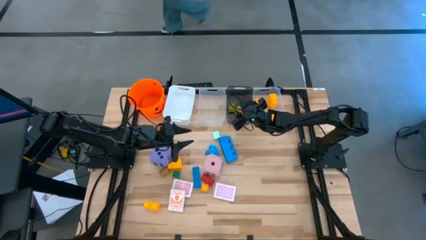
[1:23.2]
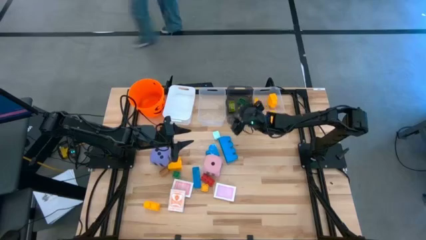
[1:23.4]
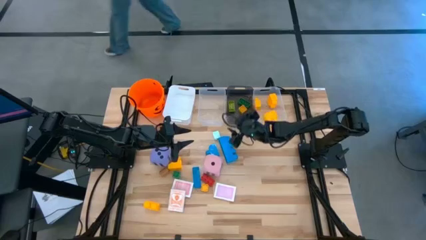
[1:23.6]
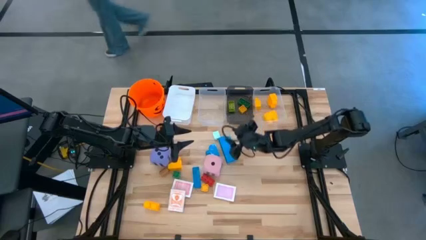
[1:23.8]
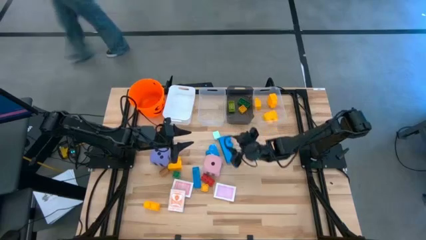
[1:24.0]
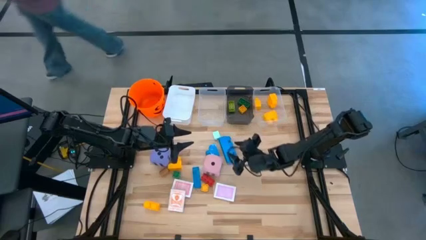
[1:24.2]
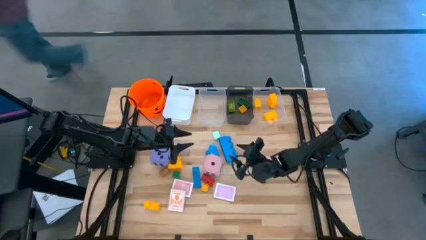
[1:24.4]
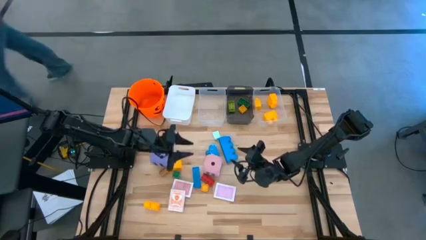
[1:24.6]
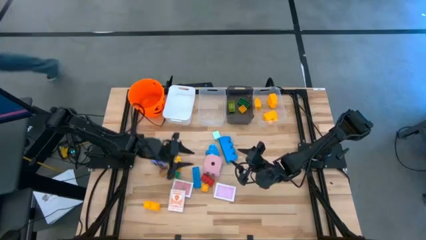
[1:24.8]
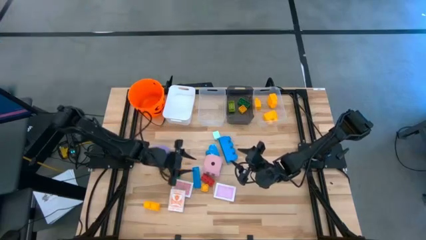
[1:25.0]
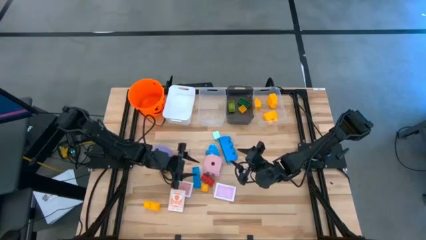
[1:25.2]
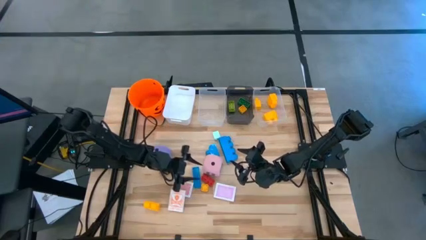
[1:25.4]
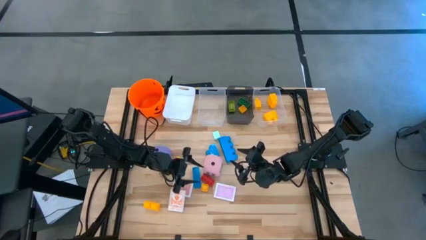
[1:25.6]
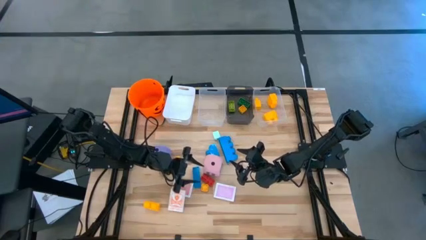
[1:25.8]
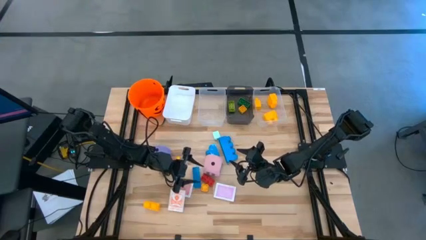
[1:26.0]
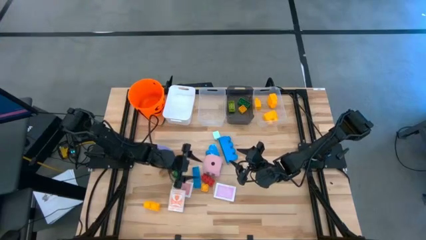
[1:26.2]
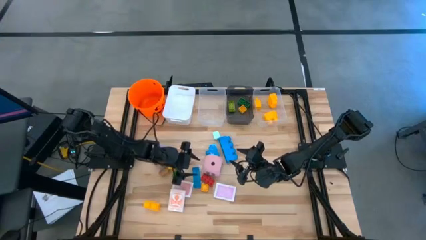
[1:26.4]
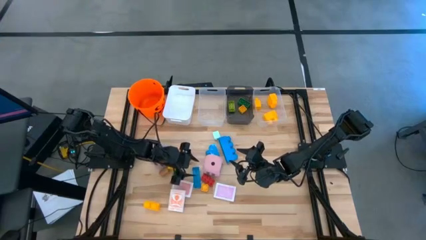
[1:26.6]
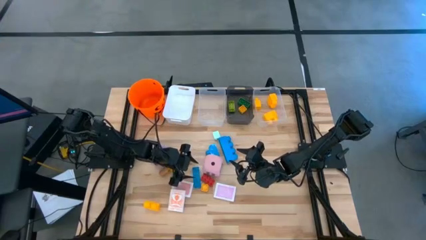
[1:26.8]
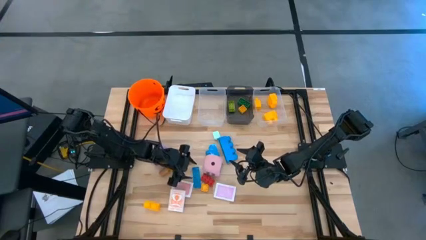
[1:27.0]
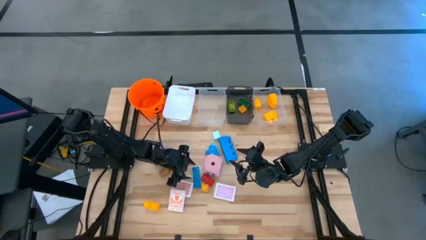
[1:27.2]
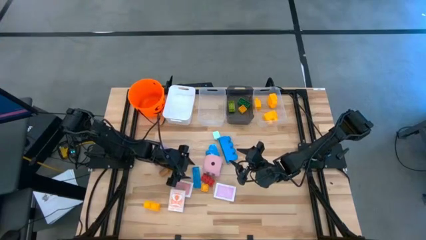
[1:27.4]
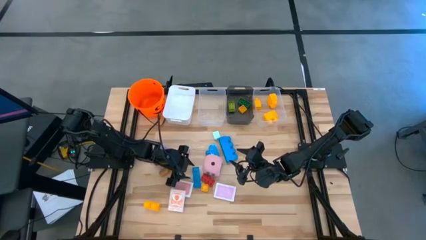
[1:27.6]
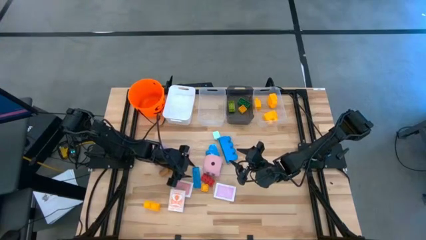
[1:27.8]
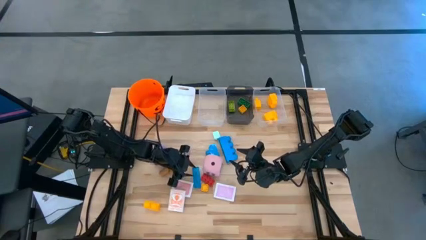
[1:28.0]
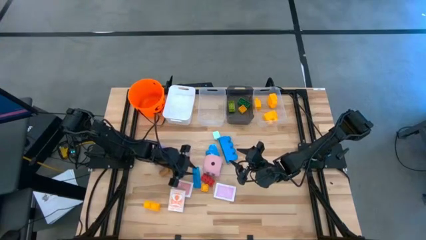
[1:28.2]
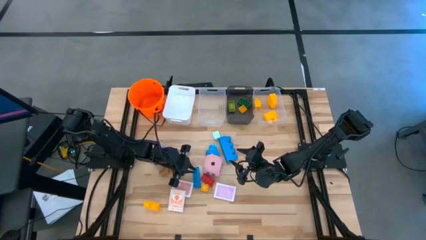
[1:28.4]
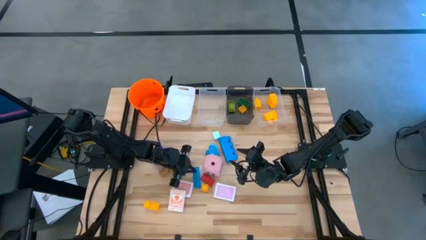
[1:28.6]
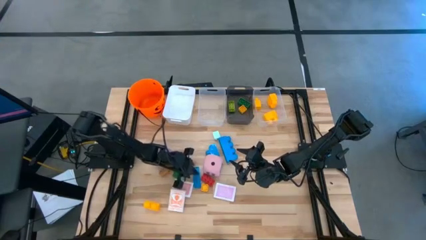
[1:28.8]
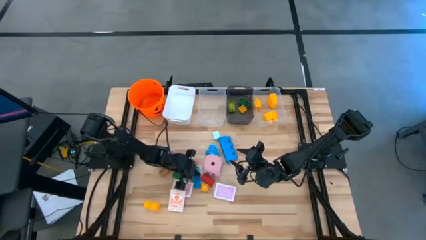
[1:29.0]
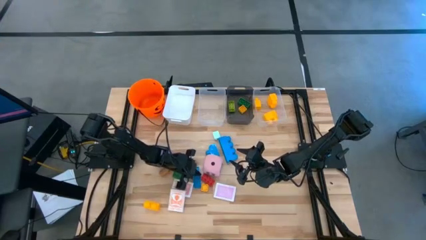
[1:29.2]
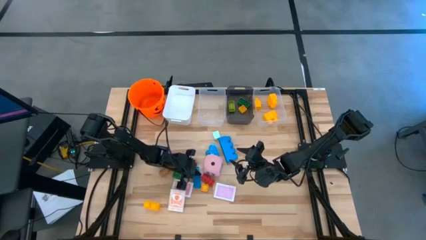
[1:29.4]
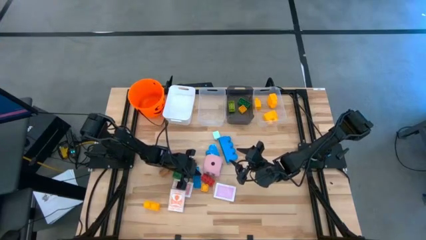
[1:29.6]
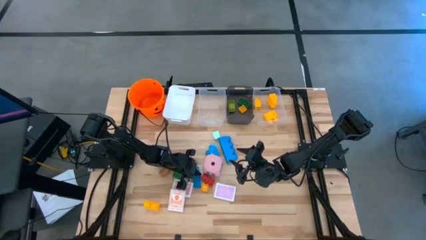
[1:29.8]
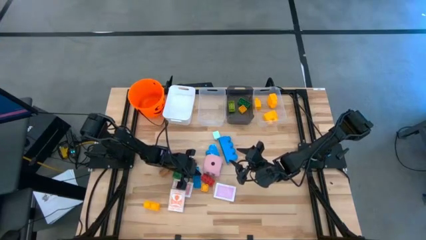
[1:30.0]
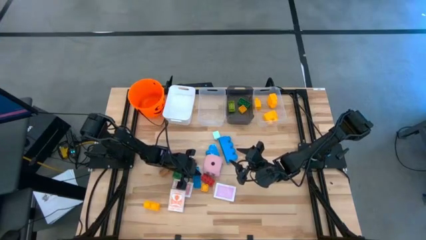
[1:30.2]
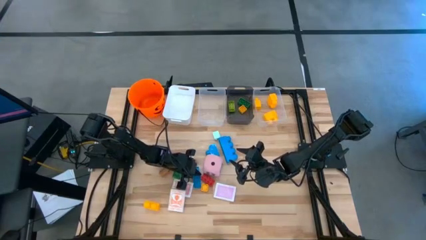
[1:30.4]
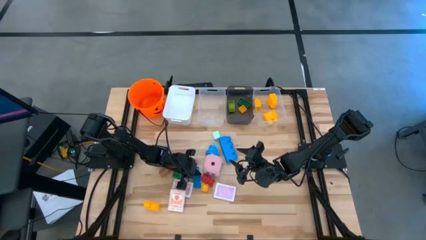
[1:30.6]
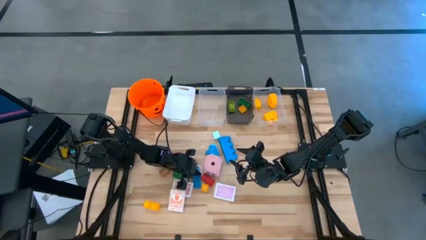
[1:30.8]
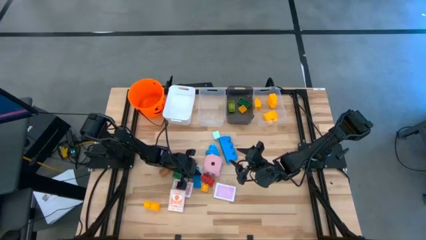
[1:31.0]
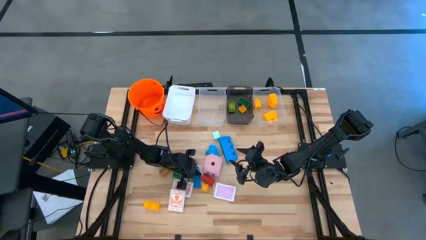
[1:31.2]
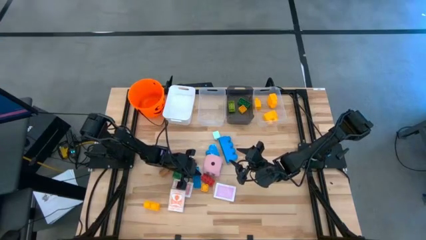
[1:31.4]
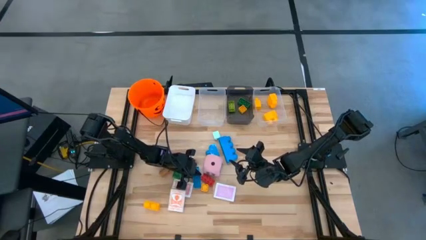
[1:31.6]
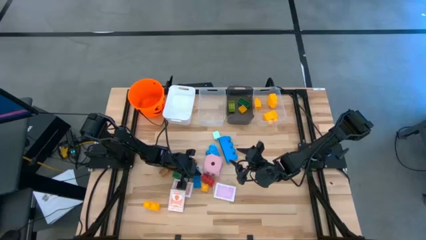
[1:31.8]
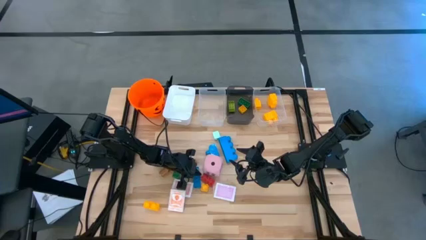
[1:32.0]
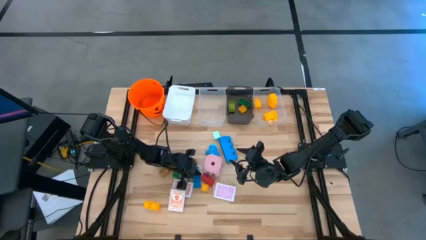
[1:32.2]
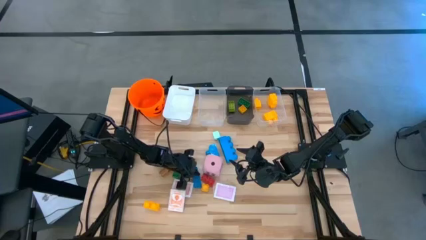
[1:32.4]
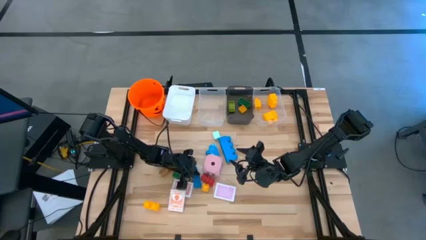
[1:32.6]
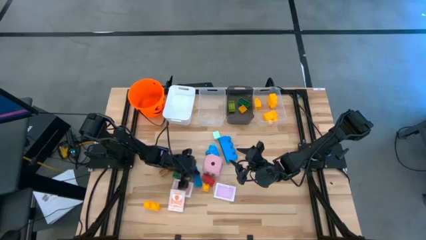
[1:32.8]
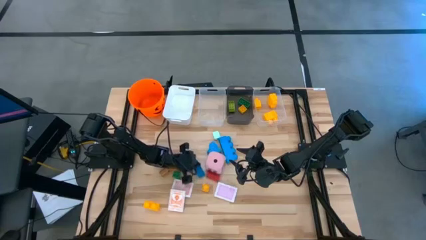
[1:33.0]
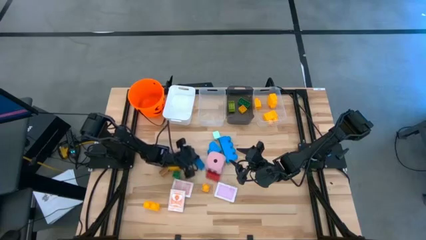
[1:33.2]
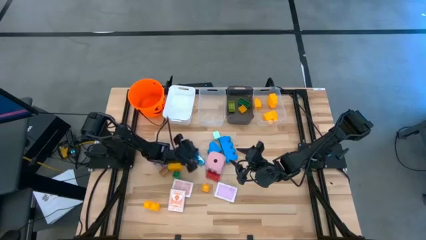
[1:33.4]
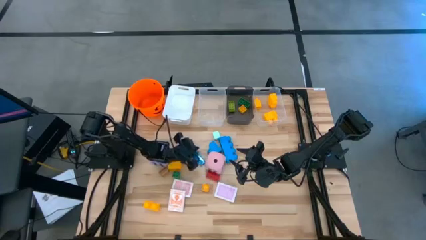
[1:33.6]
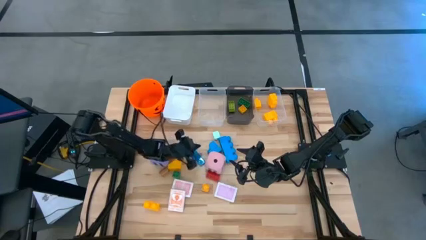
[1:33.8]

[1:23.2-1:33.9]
Task: Pick & Place Toys
Put the small blue game piece into the black bin
